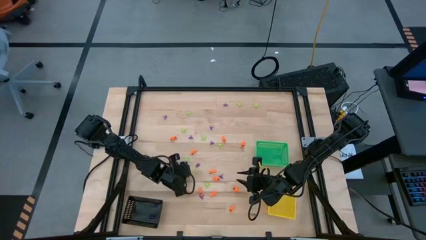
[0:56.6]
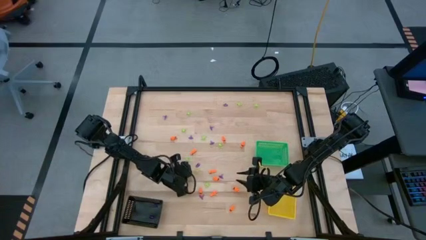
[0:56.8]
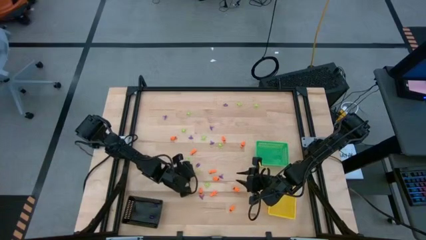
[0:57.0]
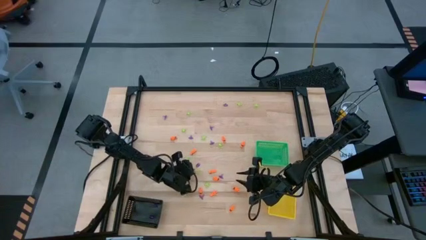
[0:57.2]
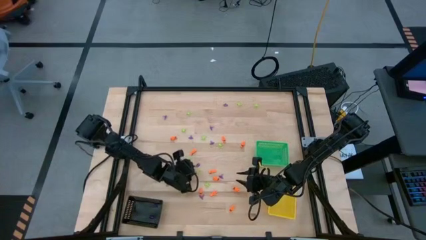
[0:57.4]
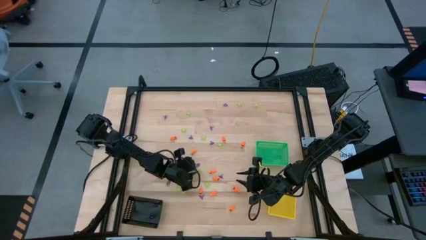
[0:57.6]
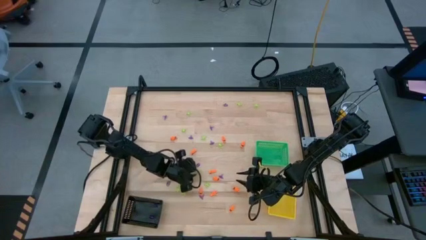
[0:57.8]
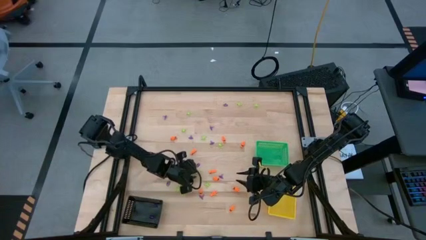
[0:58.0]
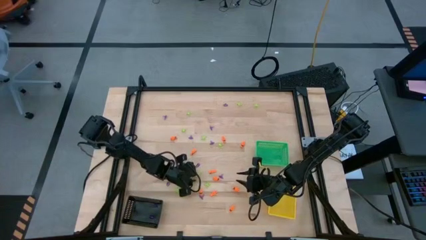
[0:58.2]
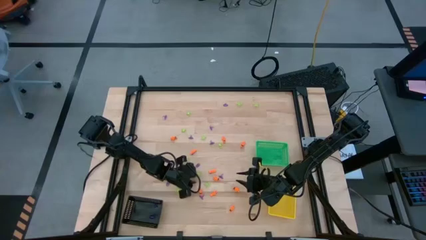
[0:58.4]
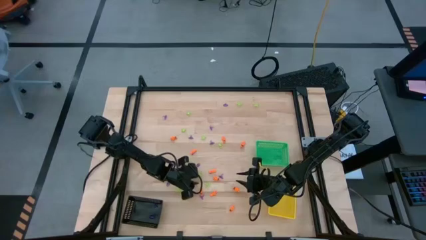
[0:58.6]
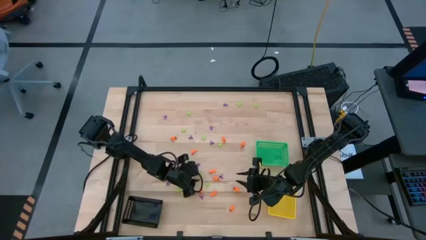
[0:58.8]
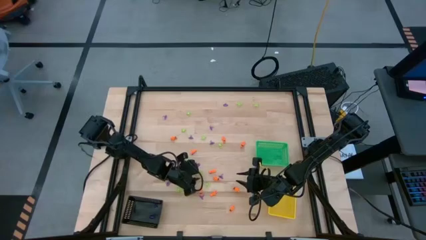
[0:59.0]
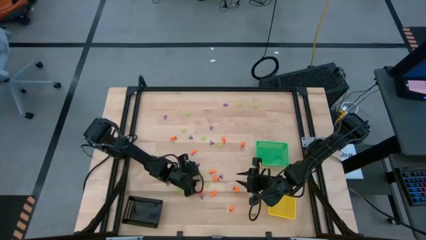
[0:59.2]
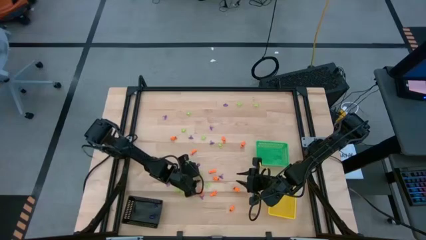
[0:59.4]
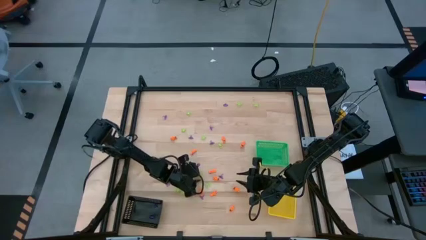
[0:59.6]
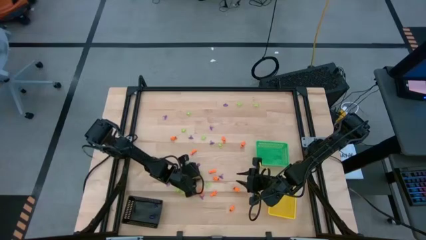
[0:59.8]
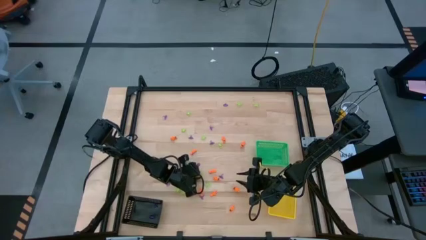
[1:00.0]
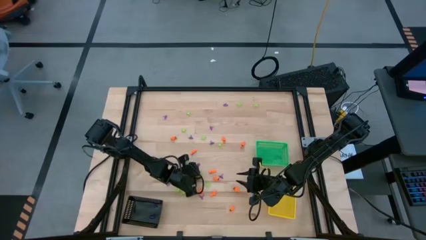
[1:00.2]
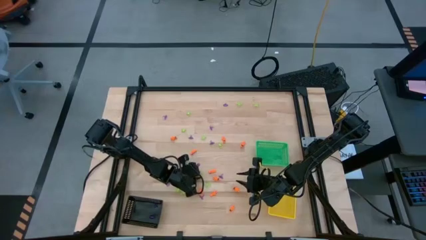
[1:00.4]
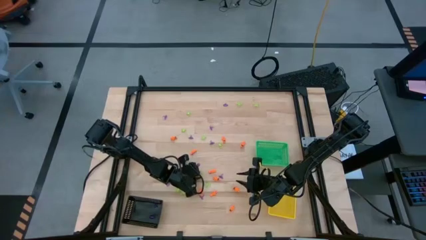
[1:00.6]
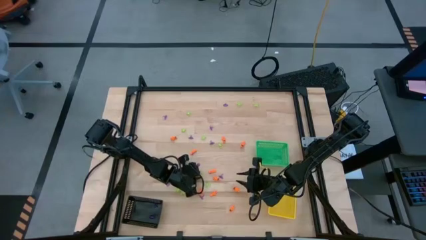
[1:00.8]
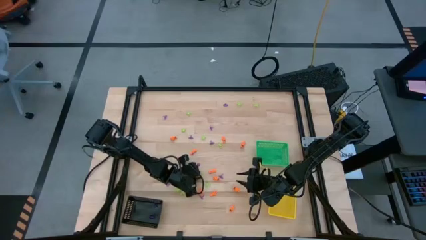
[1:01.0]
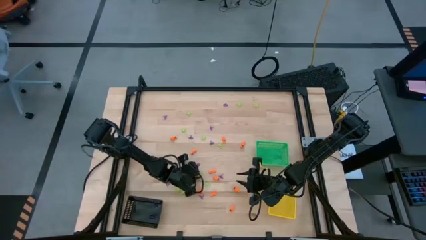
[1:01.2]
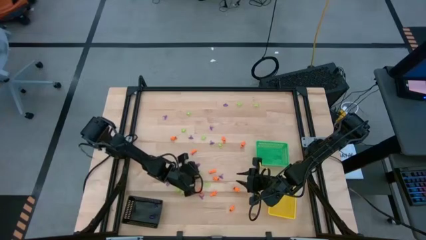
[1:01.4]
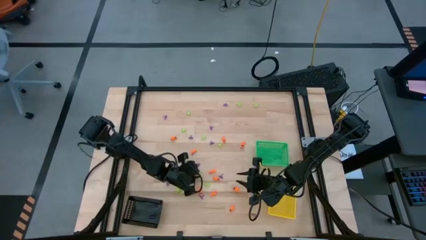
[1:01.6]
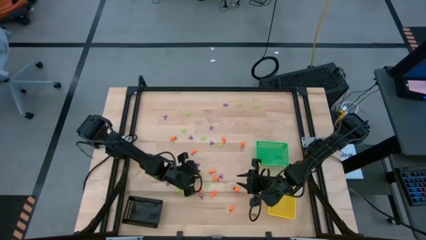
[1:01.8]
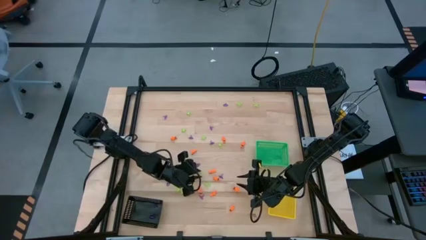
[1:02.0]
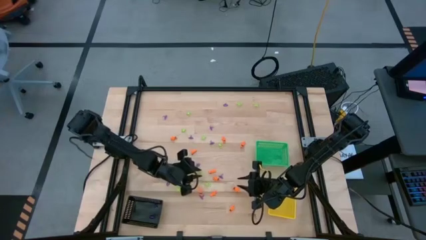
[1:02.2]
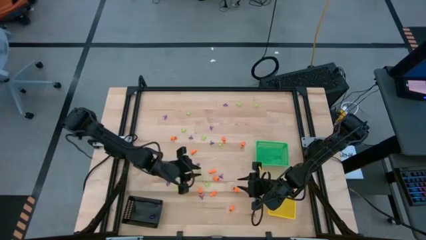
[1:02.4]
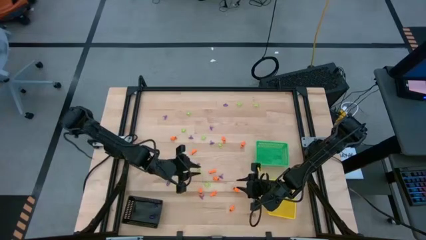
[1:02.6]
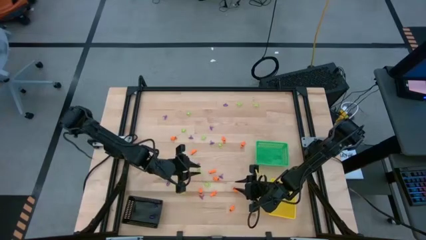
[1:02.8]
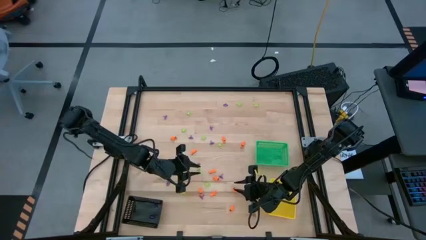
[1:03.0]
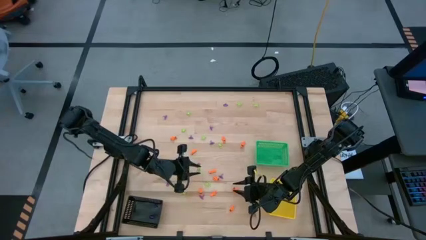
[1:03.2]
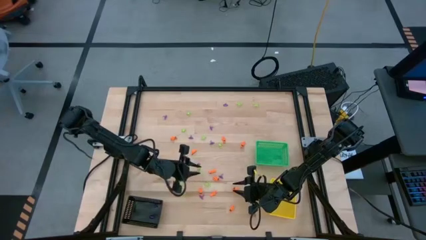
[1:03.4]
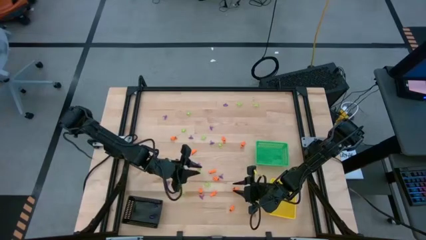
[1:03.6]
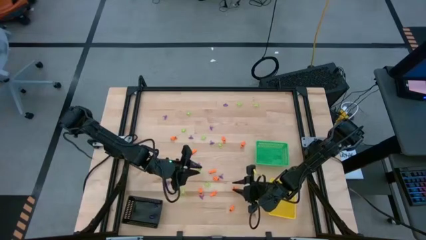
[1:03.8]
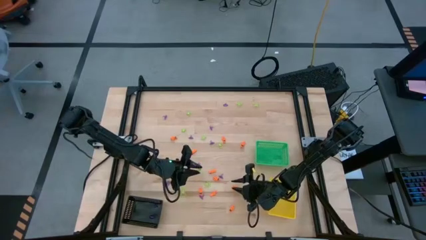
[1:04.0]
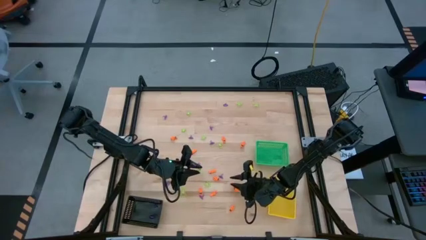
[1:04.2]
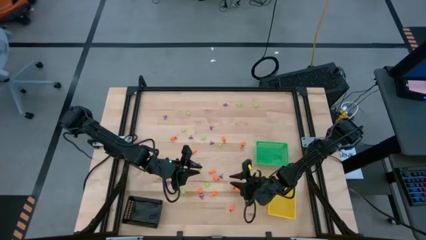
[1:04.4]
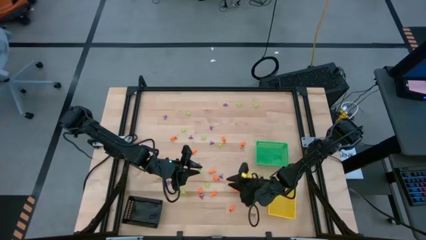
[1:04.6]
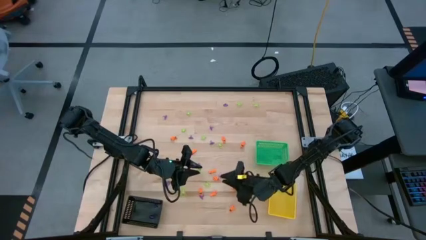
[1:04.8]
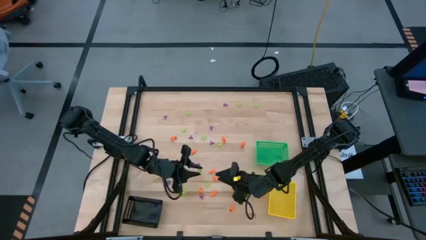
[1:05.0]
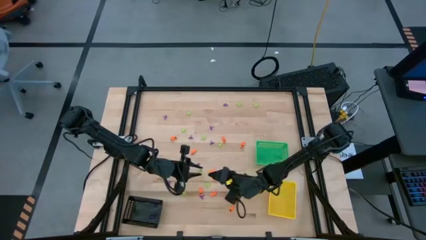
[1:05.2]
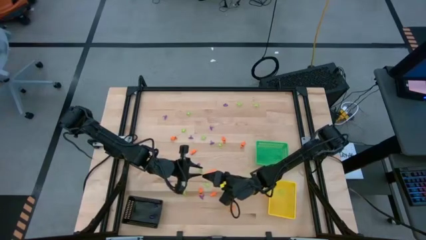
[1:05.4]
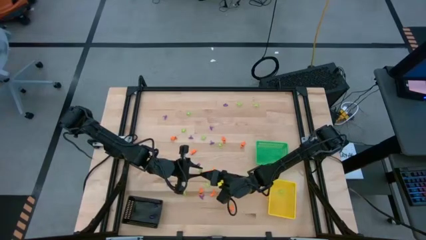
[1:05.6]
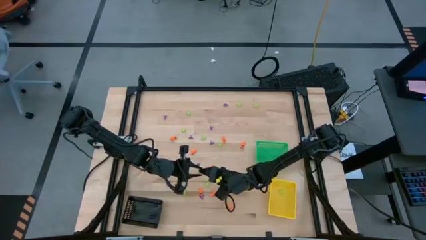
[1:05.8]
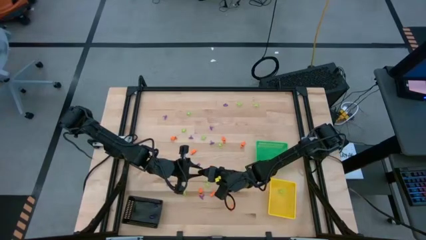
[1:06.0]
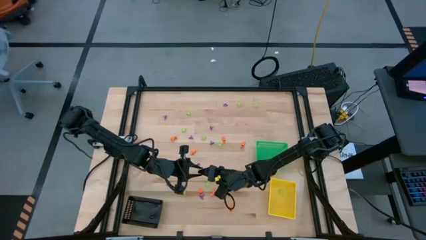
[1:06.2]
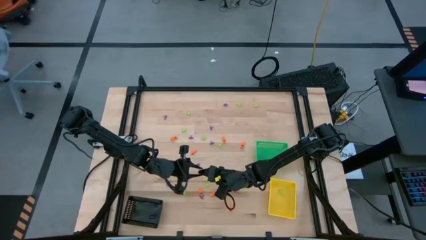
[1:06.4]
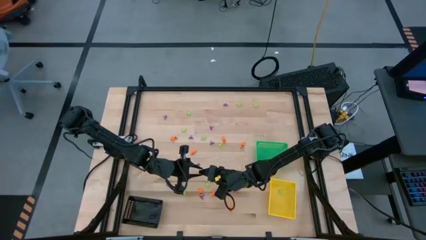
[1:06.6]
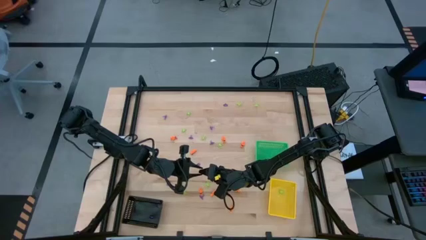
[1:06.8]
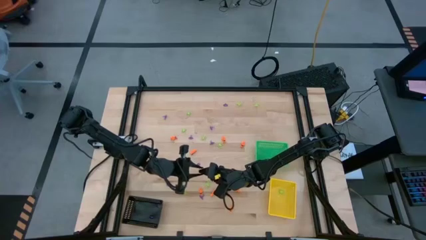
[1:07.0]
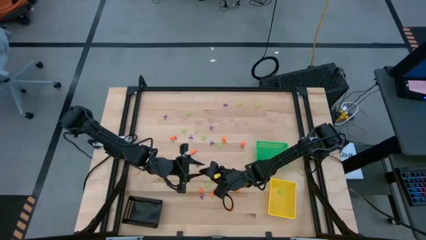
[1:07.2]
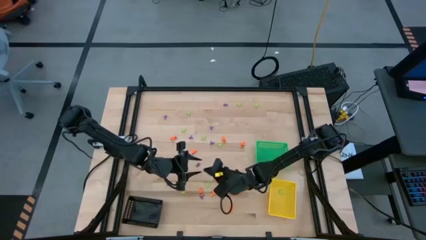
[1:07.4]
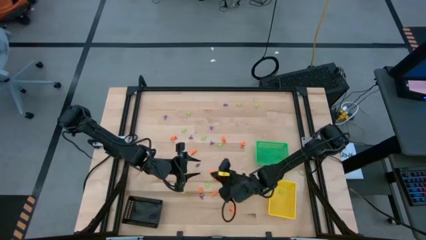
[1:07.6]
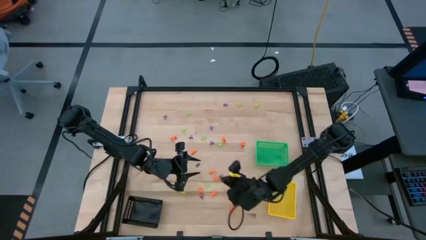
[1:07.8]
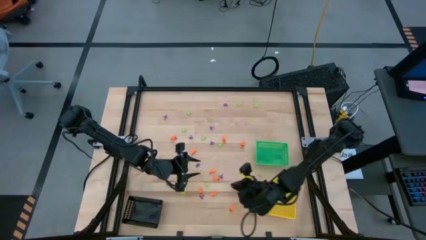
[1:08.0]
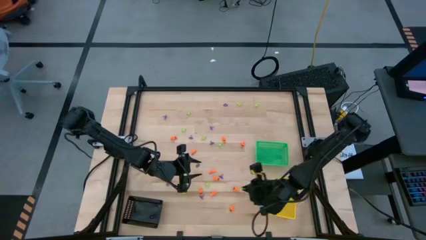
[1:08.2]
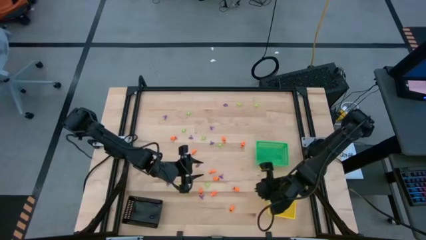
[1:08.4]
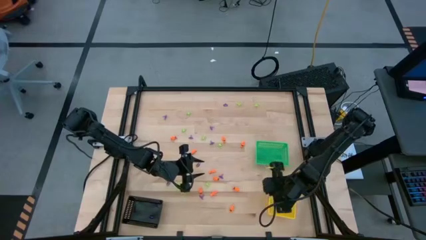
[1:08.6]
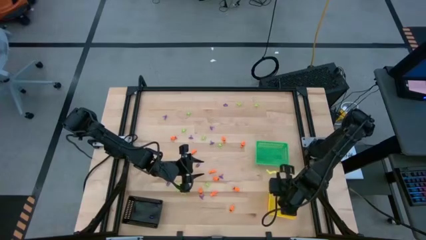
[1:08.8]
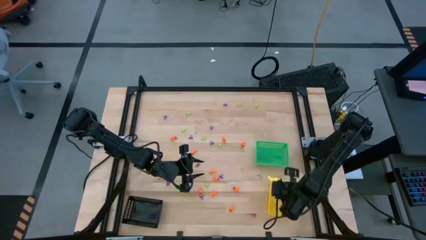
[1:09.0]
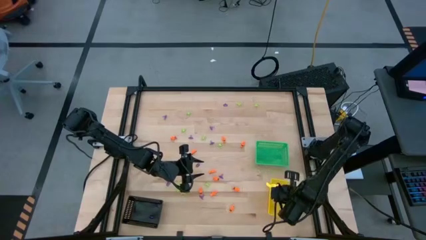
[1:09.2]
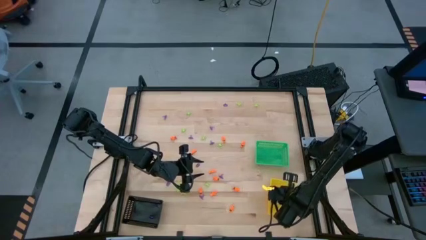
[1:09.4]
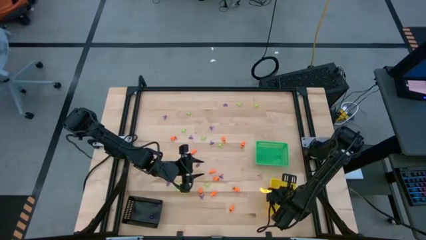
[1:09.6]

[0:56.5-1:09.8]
Task: Sort Halloween decoration
Put the green spider toy into the yellow bin
